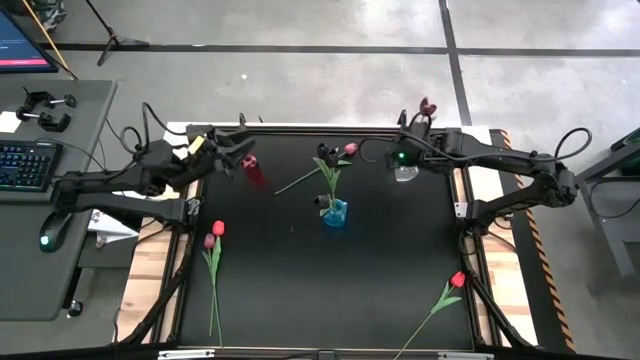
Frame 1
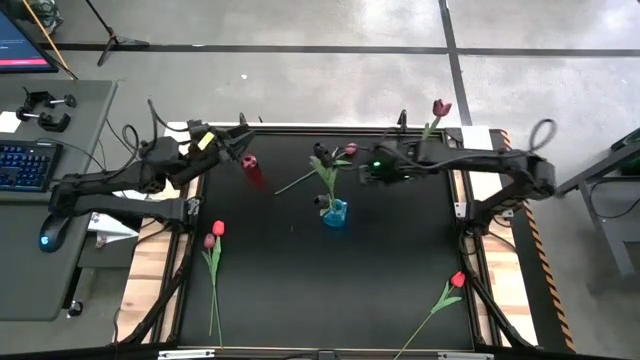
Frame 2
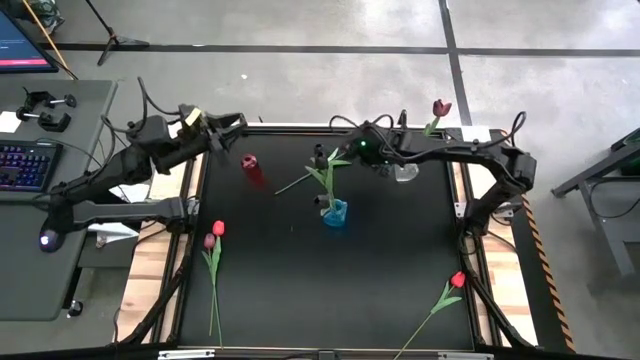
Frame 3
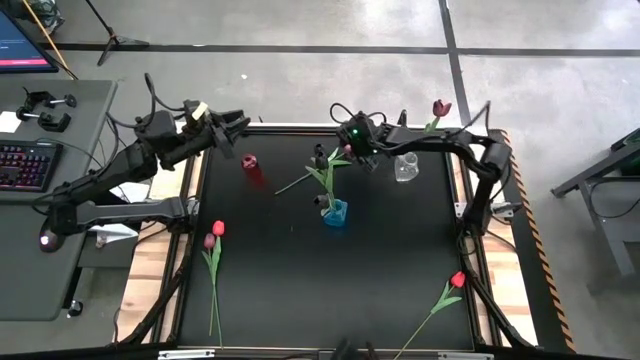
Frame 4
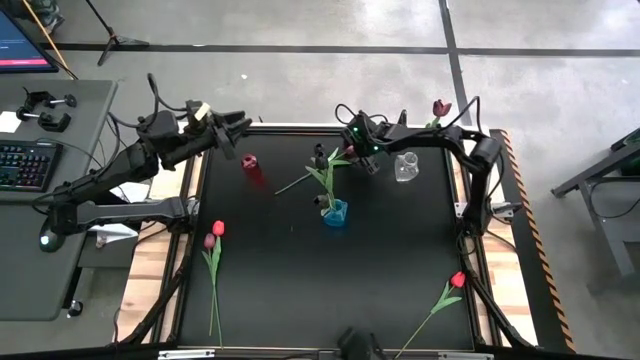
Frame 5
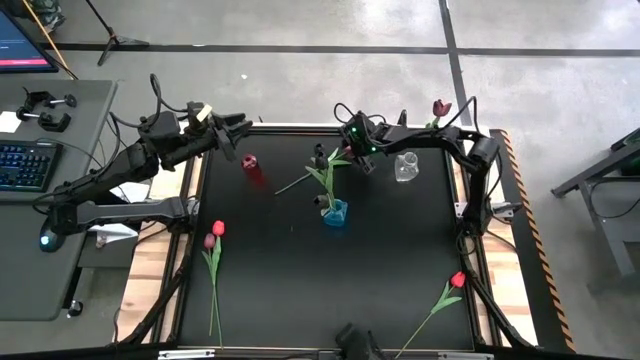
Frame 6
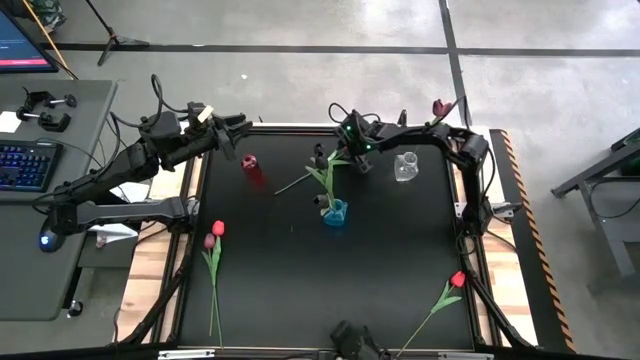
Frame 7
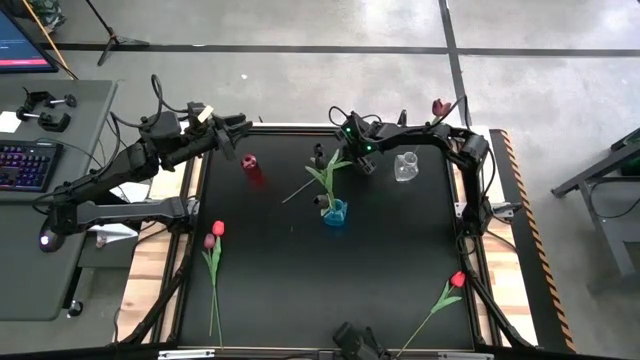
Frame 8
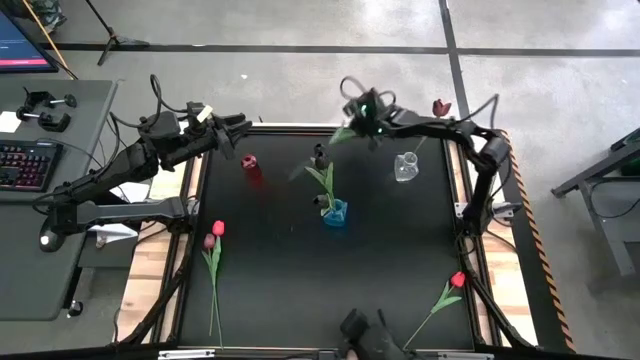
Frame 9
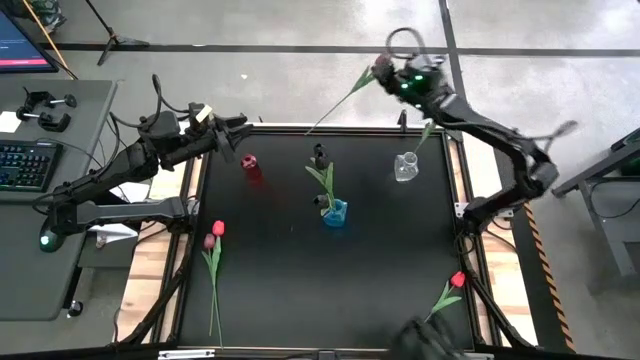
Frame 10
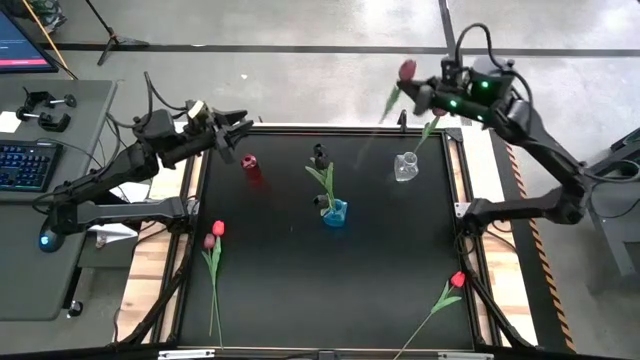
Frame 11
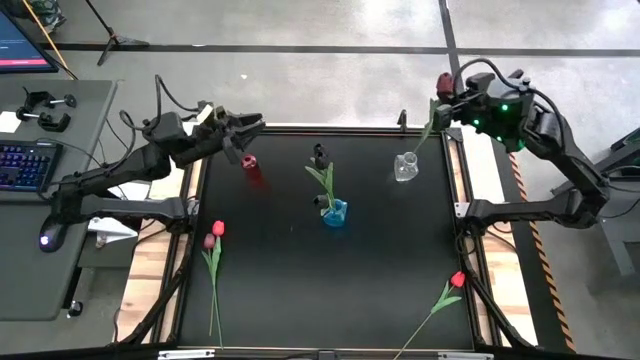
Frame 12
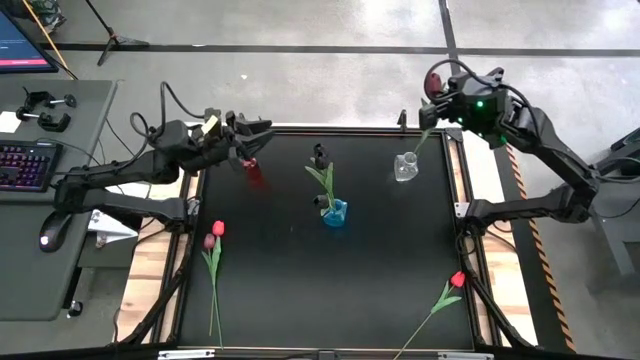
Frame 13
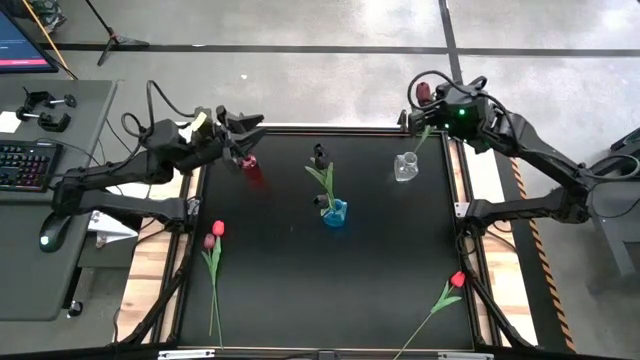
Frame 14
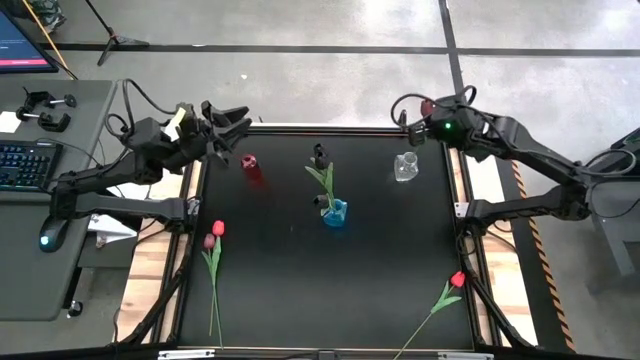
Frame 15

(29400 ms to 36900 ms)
Task: Sort flowers into vase by color
Put the top red tulip into the transparent flower vase

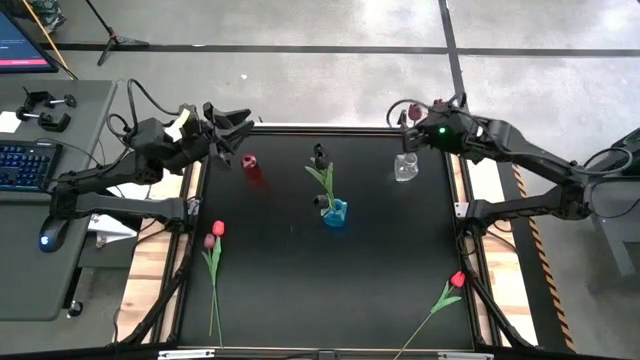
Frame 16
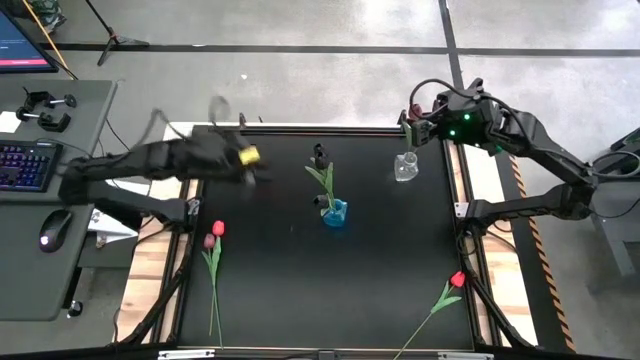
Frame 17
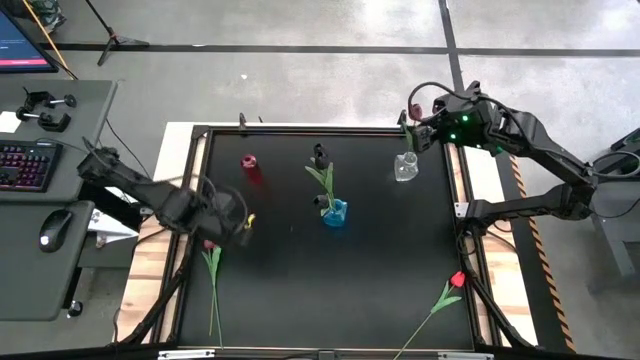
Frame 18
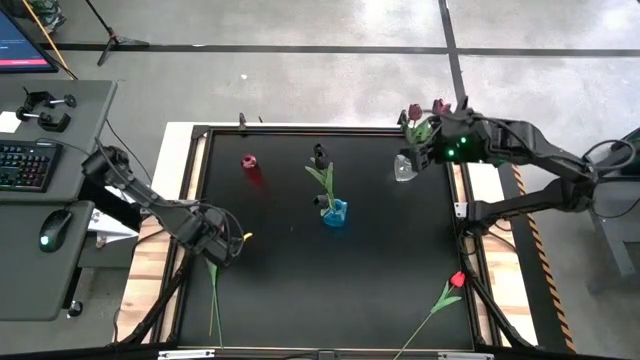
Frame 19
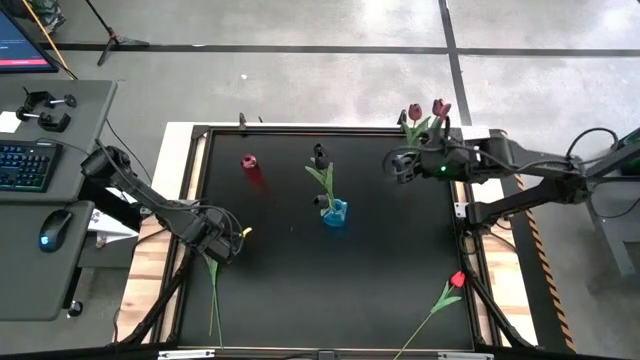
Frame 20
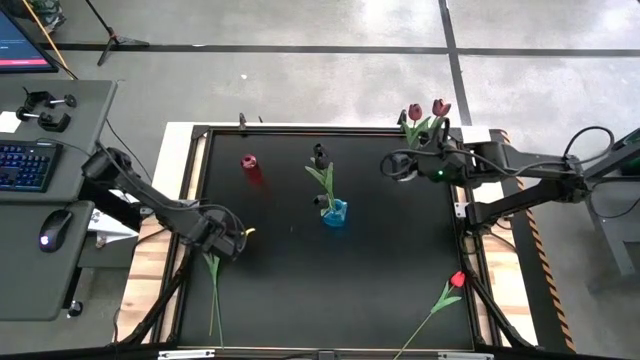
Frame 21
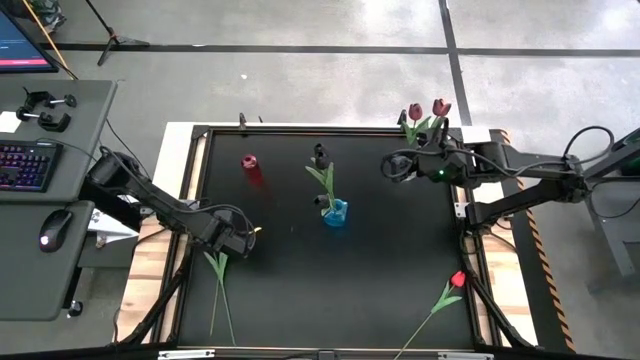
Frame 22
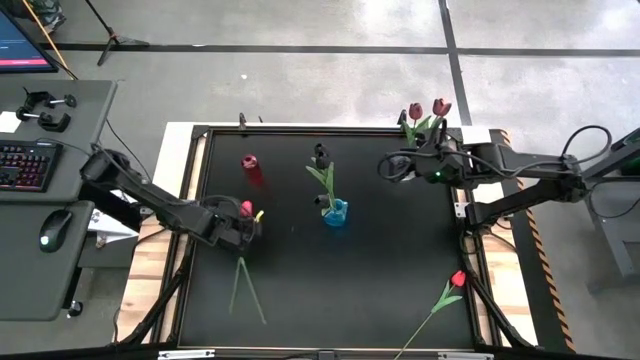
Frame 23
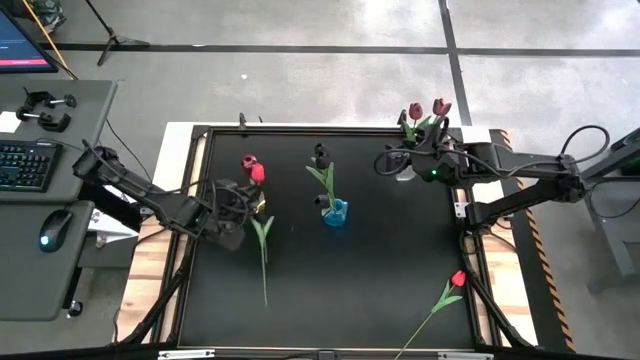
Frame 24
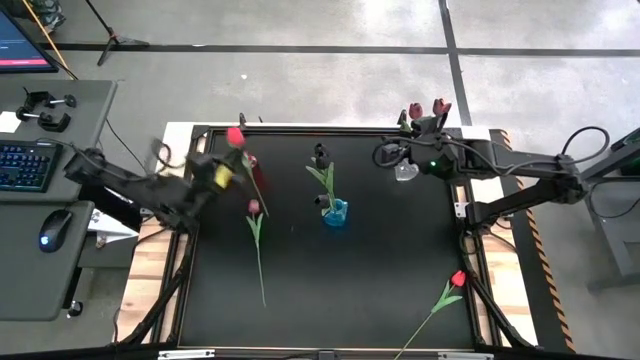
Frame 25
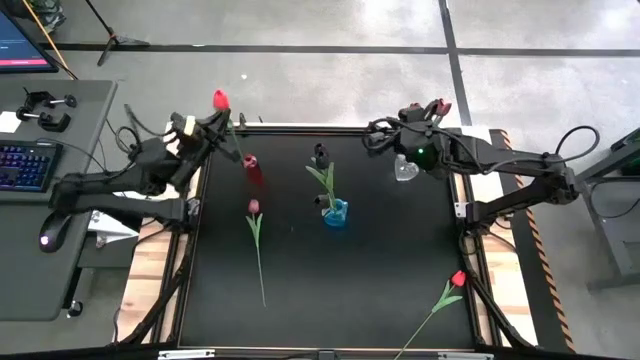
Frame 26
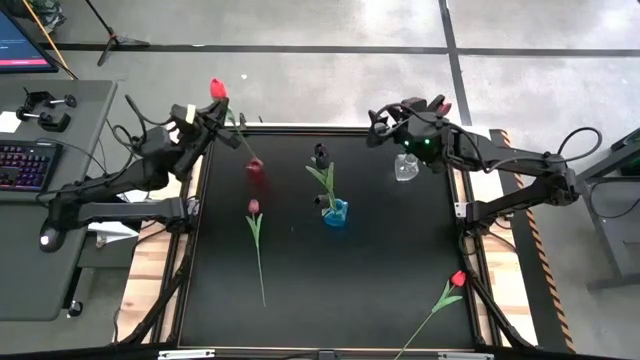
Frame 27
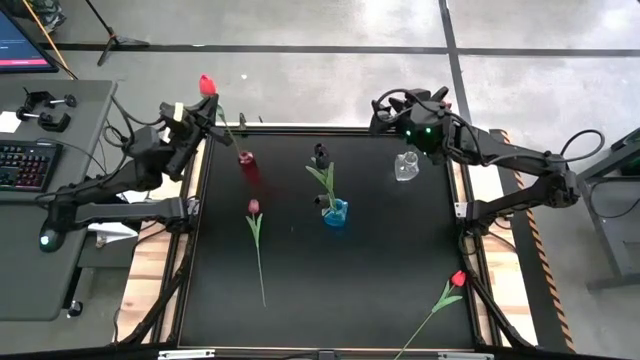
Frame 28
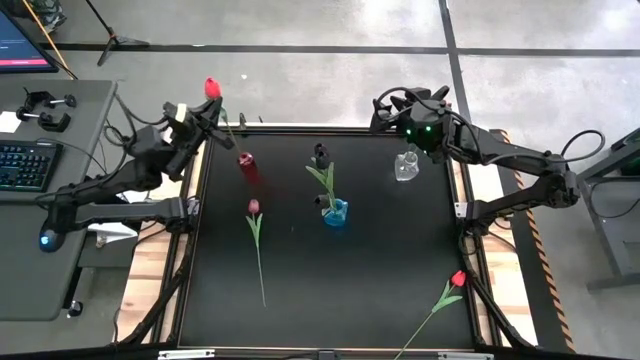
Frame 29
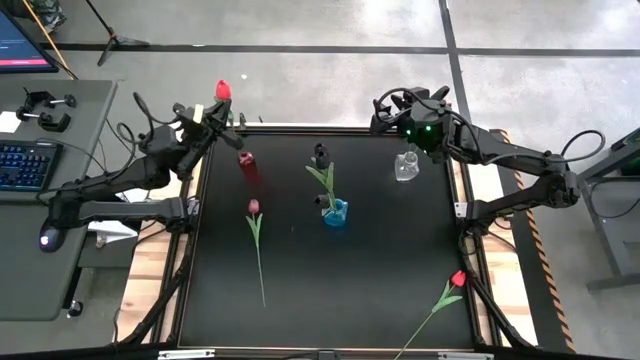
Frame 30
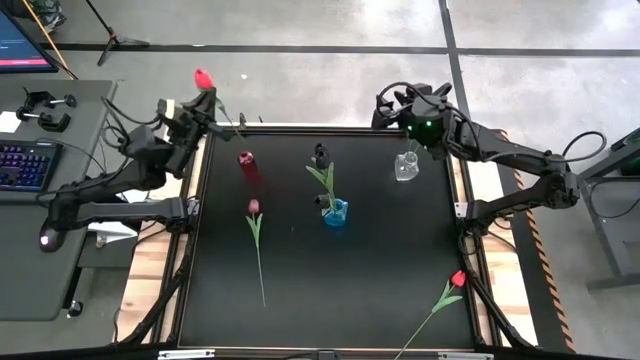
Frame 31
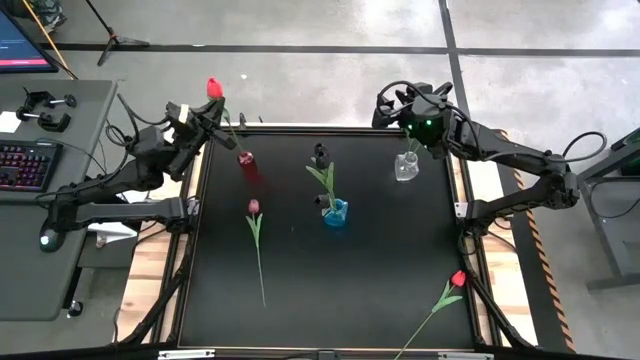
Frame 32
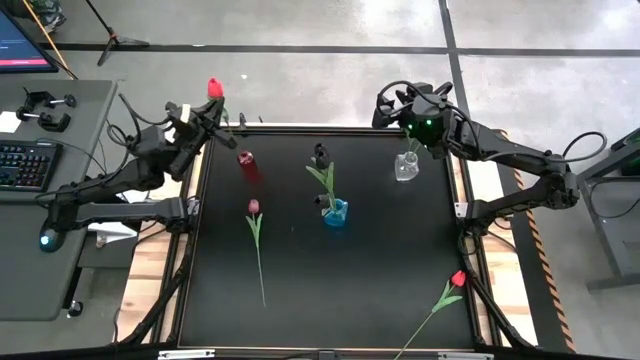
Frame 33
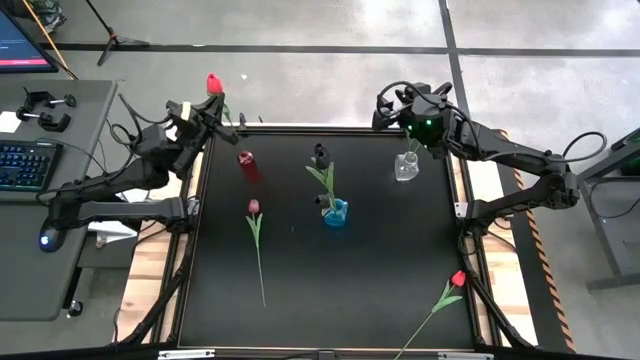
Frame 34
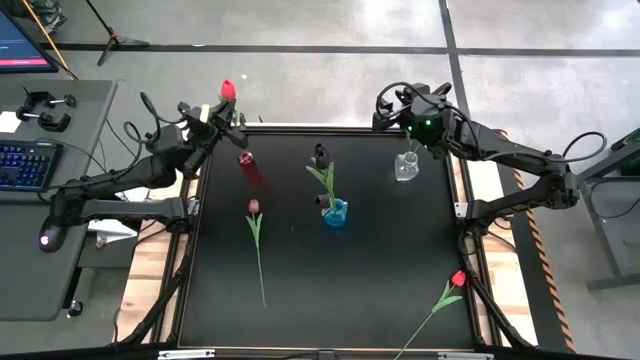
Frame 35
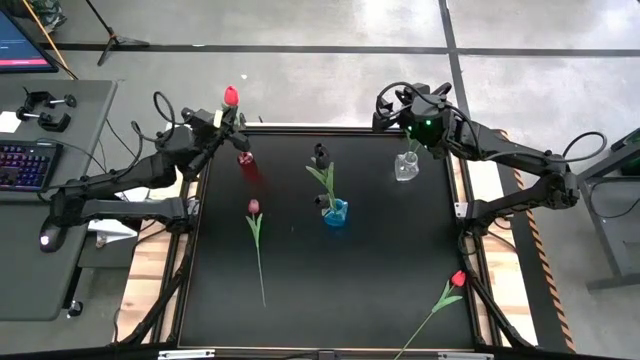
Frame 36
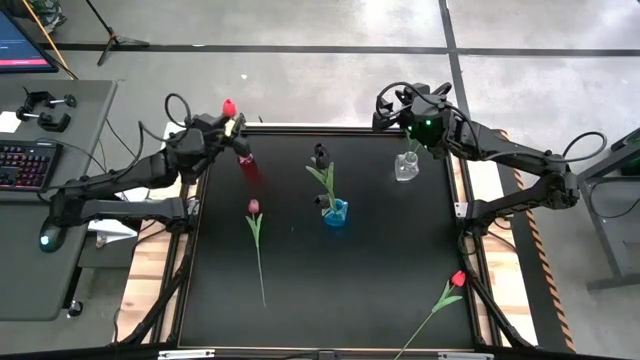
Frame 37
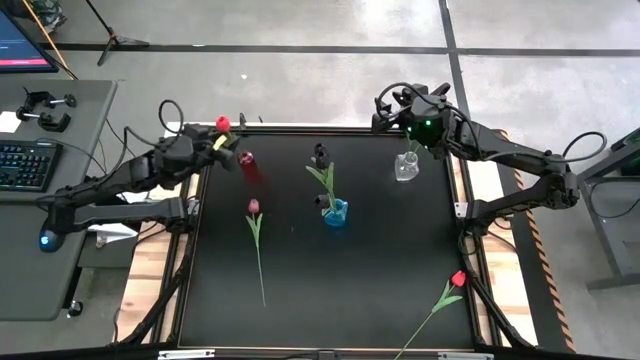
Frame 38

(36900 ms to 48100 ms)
Put the left pink tulip into the red flower vase

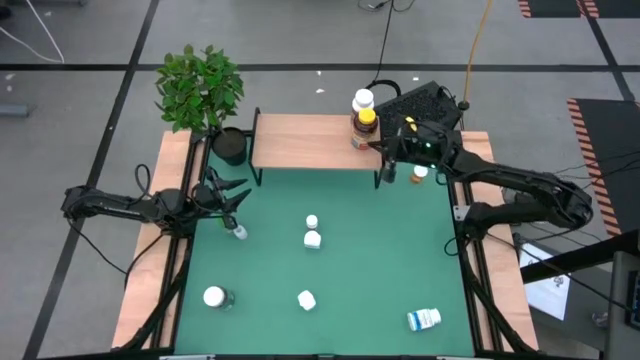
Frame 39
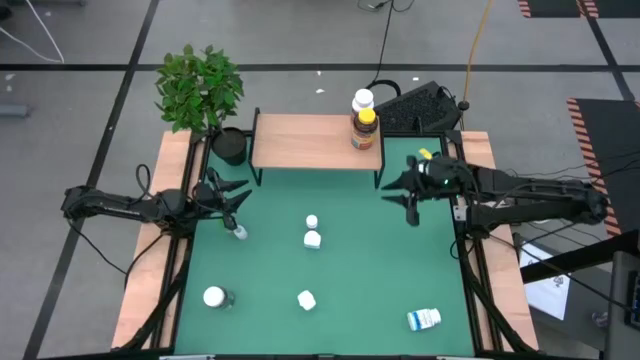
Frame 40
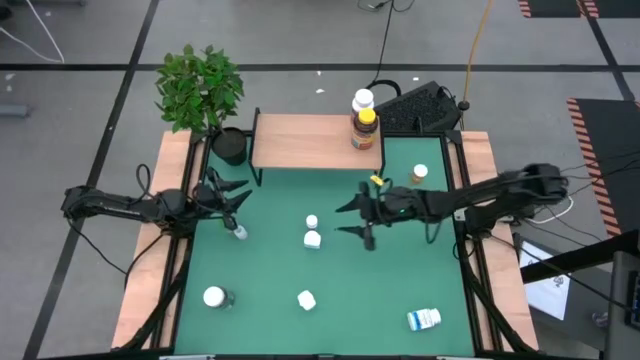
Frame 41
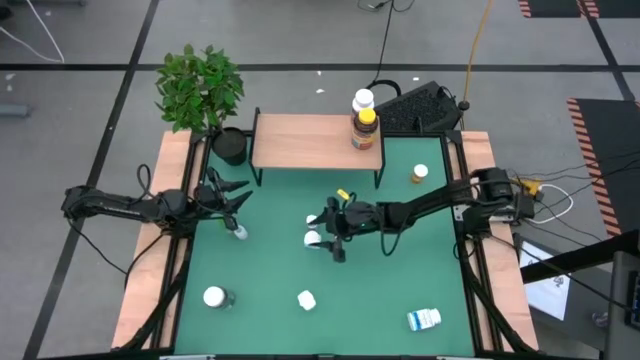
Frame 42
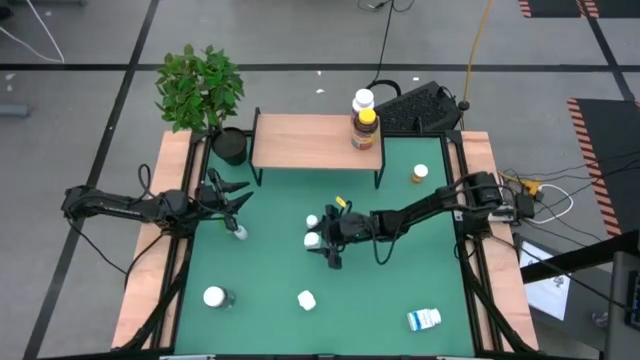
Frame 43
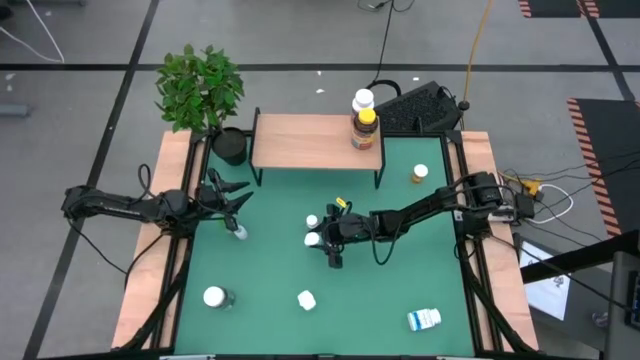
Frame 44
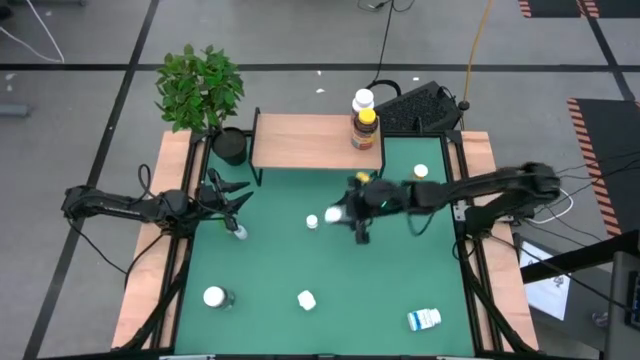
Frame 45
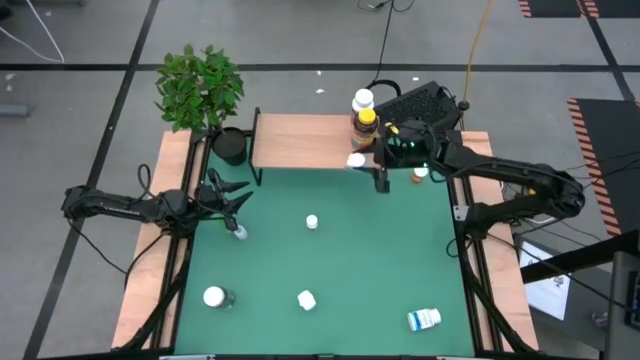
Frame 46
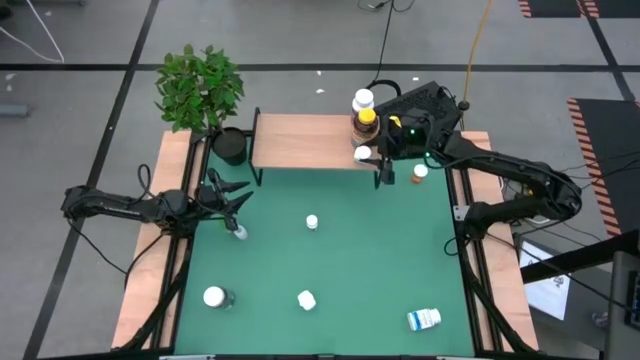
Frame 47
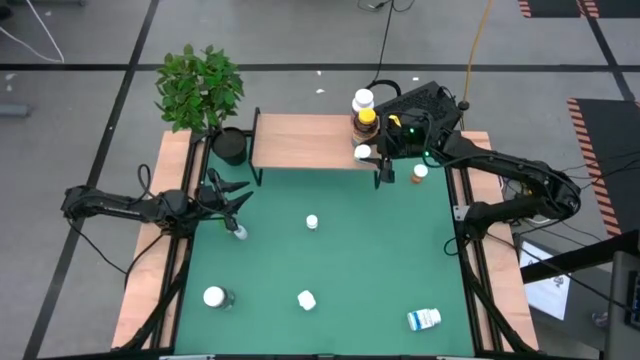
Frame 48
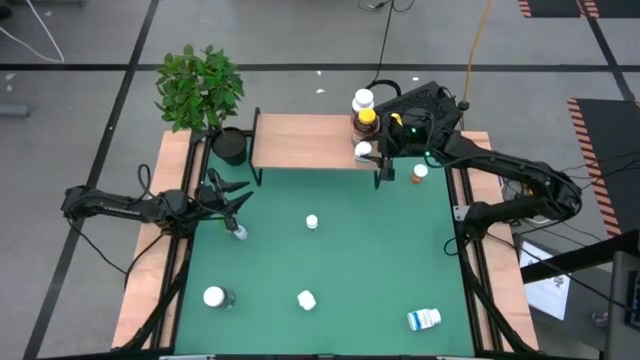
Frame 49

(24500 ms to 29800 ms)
Task: Pick and place medicine bottles onto shelf by color
Put the large white pill bottle on the top shelf
